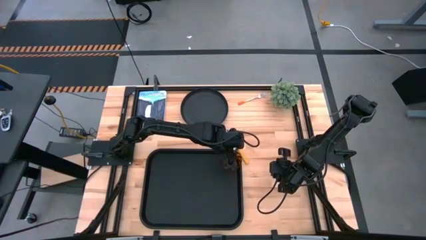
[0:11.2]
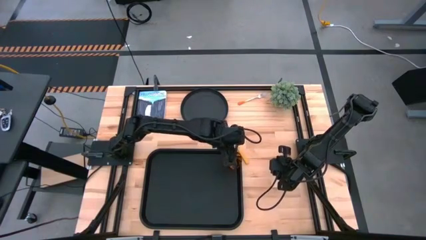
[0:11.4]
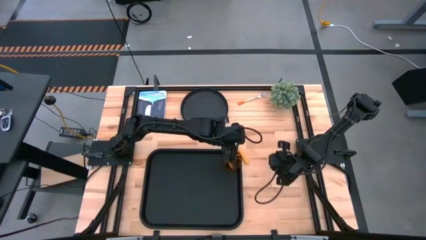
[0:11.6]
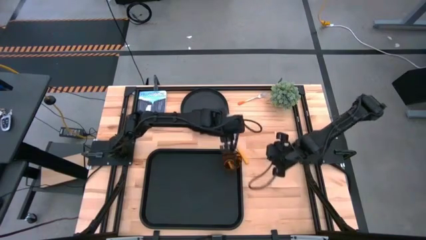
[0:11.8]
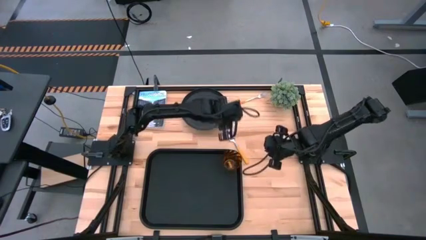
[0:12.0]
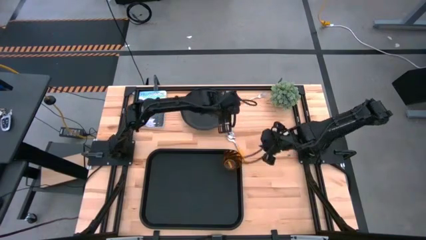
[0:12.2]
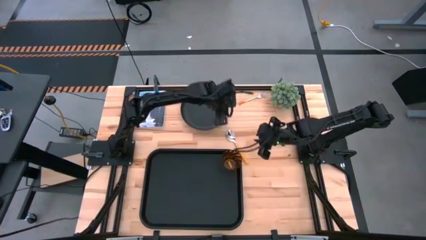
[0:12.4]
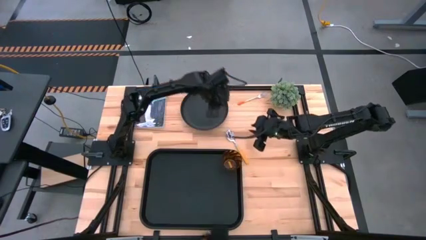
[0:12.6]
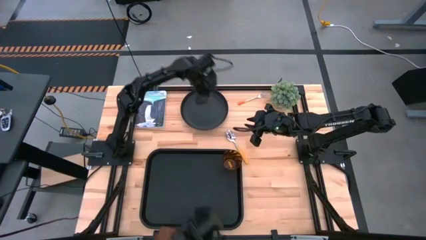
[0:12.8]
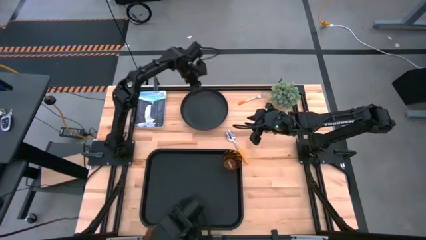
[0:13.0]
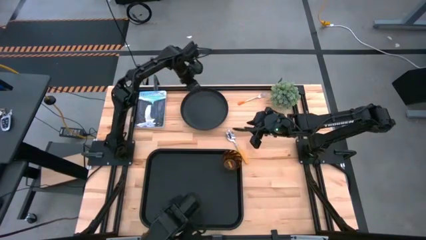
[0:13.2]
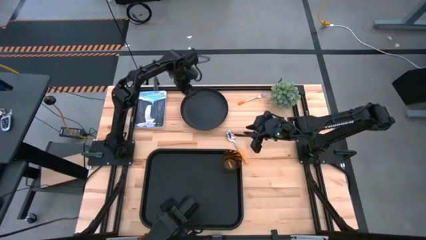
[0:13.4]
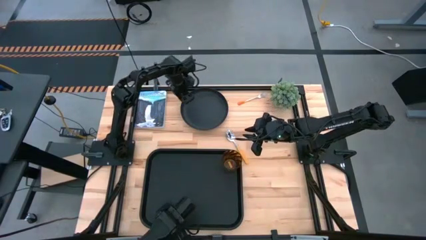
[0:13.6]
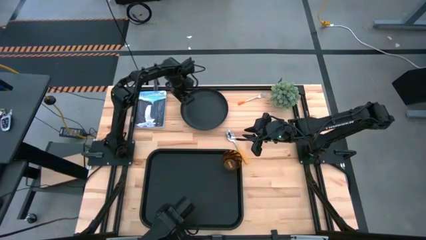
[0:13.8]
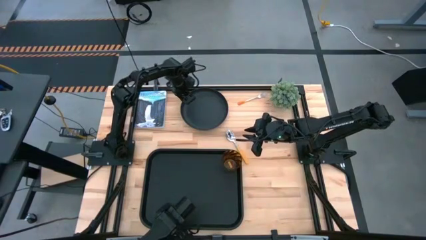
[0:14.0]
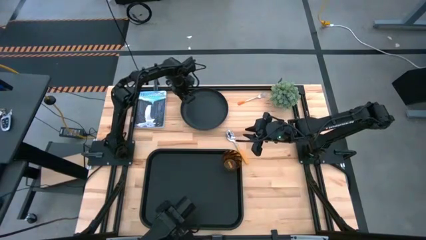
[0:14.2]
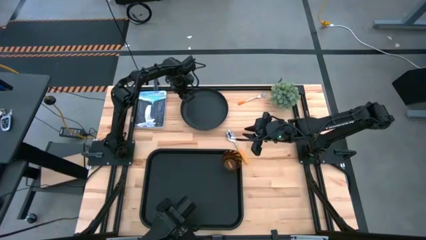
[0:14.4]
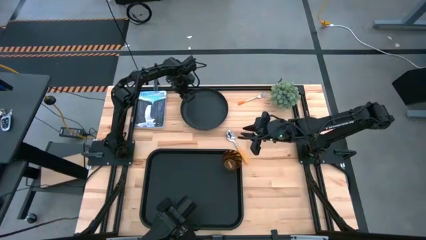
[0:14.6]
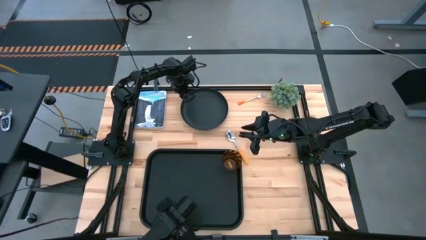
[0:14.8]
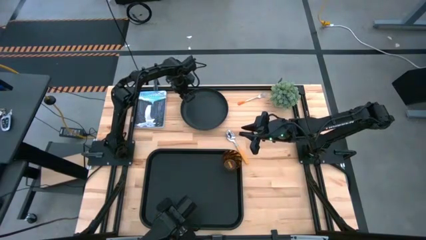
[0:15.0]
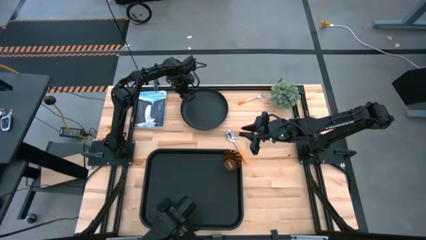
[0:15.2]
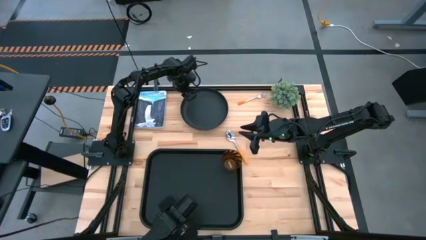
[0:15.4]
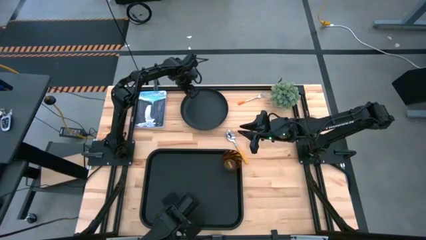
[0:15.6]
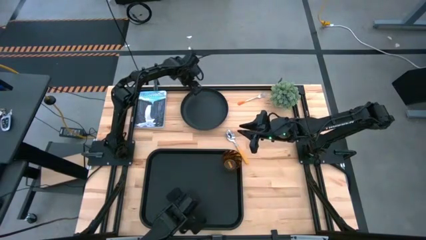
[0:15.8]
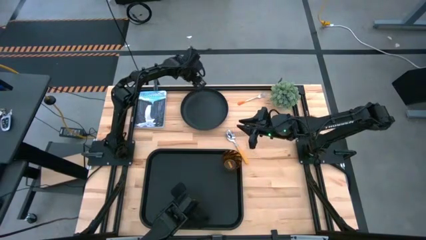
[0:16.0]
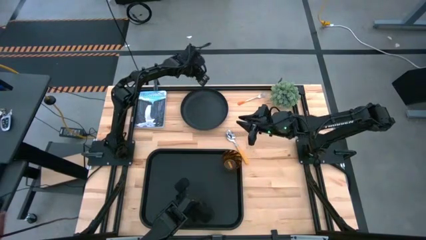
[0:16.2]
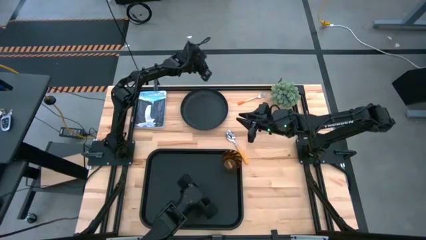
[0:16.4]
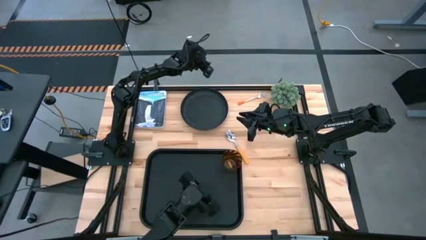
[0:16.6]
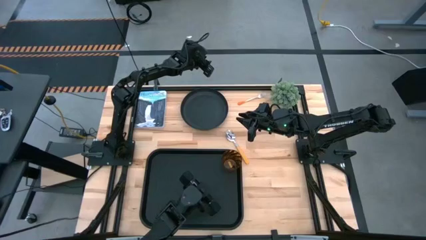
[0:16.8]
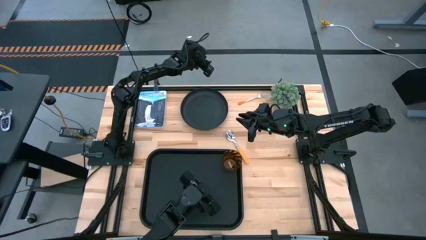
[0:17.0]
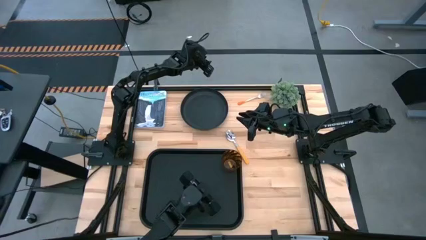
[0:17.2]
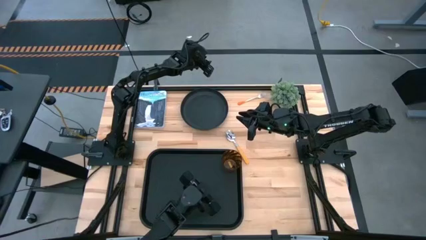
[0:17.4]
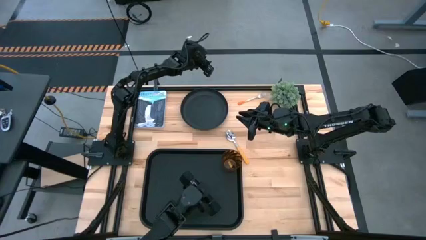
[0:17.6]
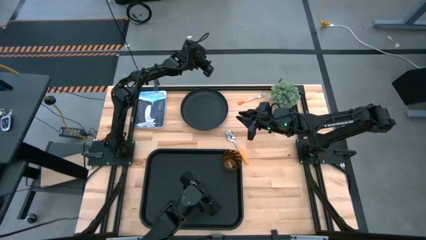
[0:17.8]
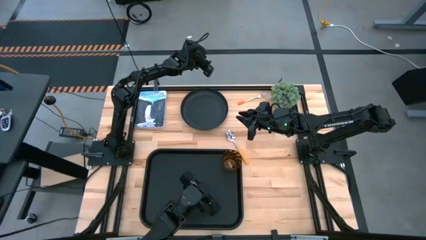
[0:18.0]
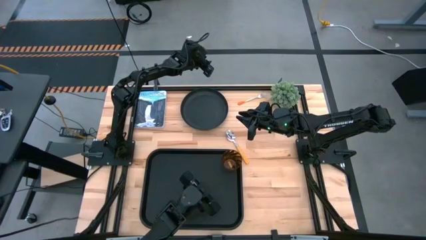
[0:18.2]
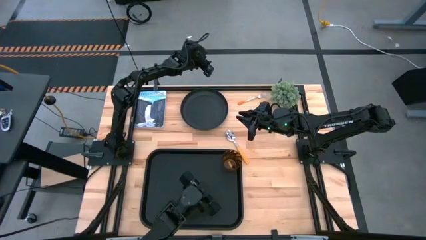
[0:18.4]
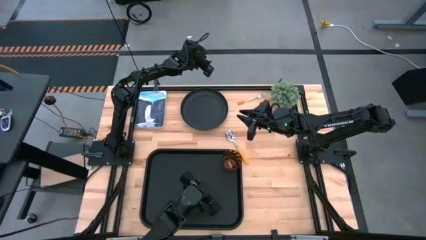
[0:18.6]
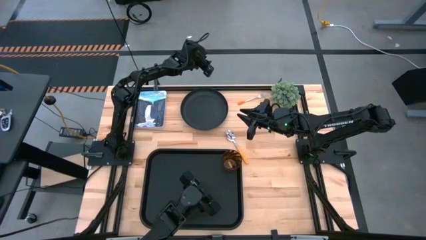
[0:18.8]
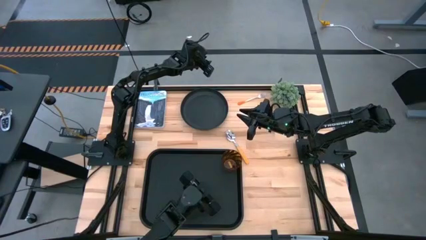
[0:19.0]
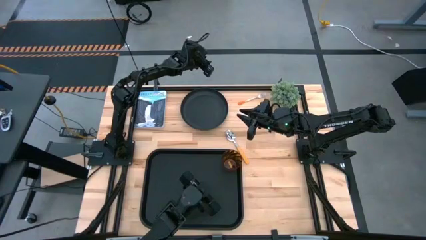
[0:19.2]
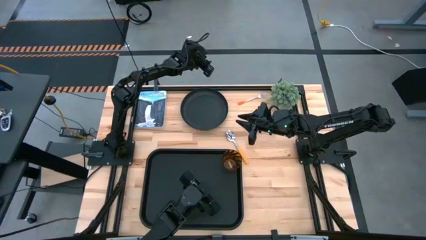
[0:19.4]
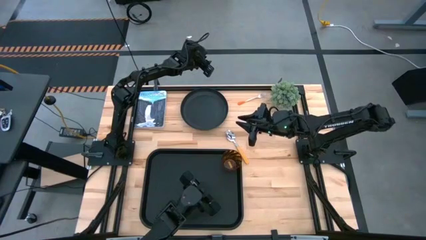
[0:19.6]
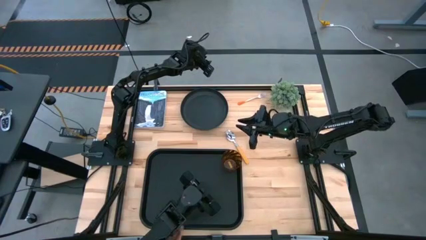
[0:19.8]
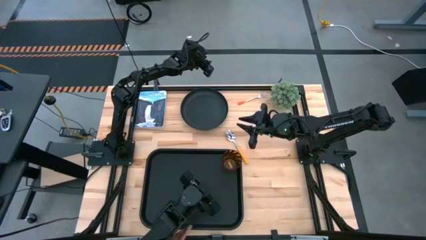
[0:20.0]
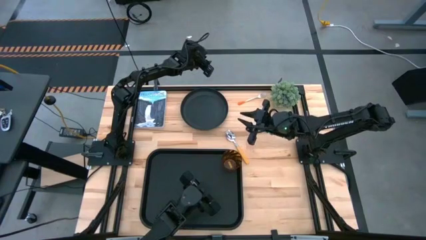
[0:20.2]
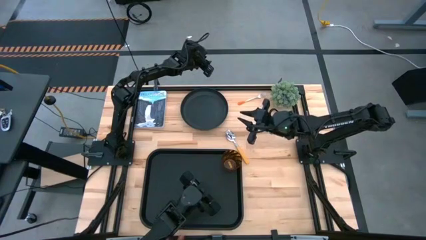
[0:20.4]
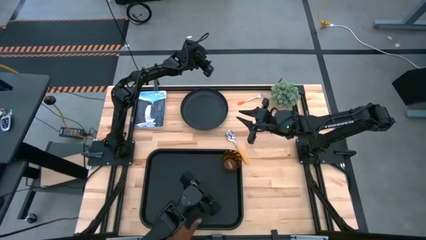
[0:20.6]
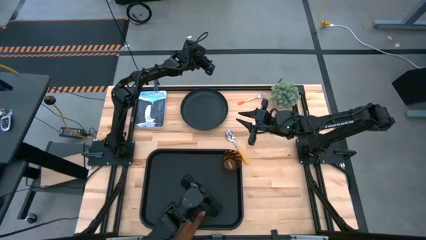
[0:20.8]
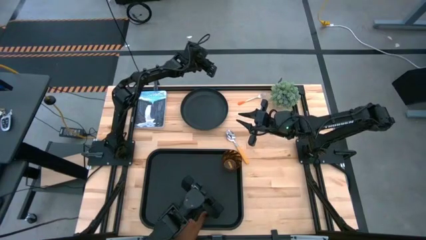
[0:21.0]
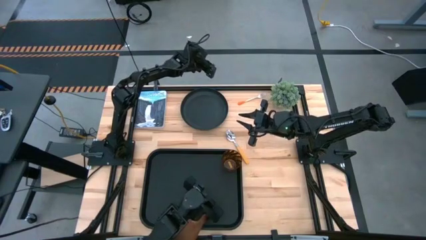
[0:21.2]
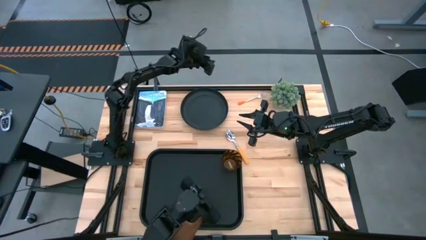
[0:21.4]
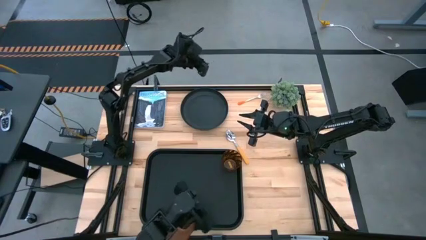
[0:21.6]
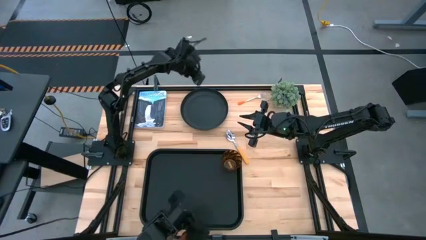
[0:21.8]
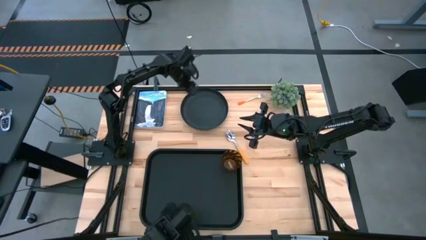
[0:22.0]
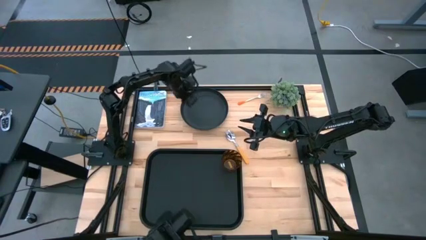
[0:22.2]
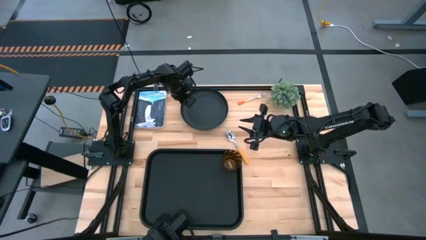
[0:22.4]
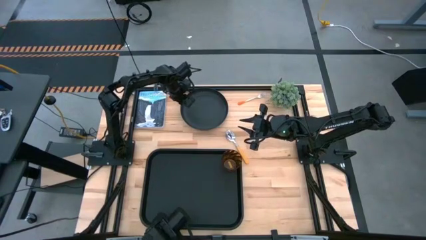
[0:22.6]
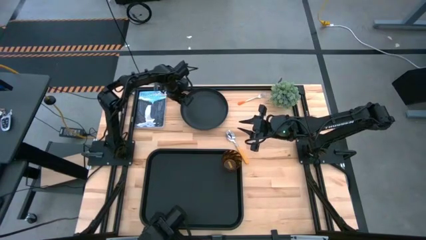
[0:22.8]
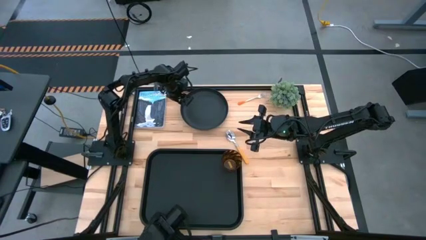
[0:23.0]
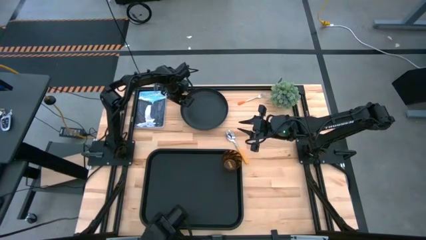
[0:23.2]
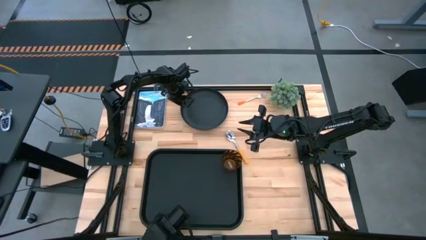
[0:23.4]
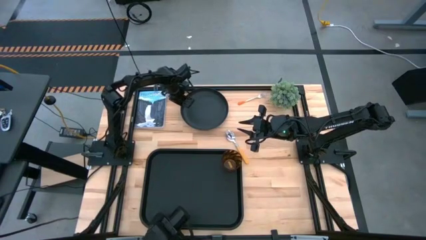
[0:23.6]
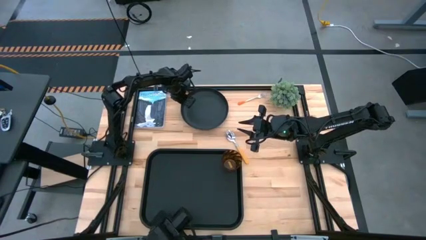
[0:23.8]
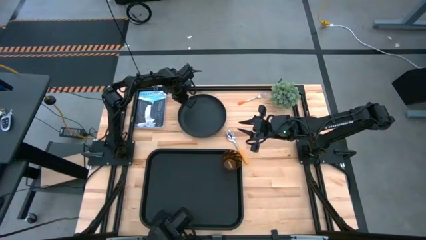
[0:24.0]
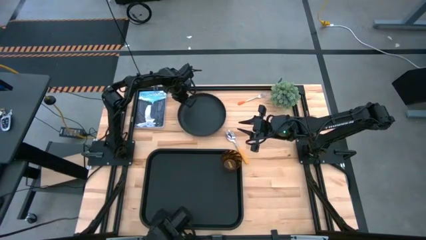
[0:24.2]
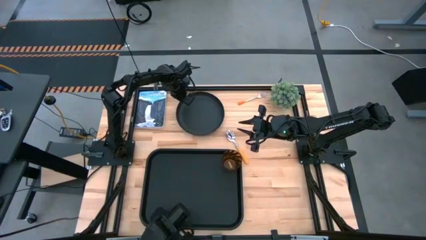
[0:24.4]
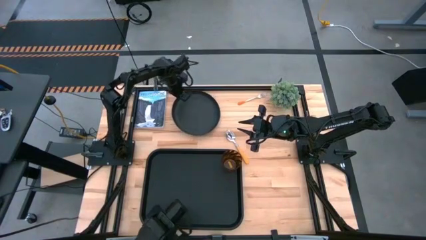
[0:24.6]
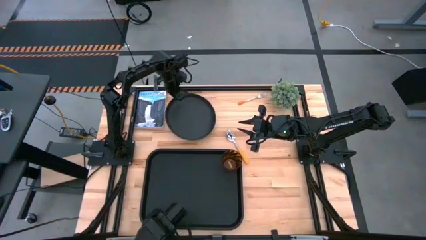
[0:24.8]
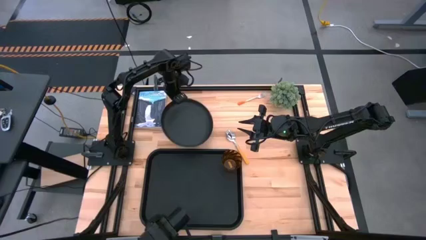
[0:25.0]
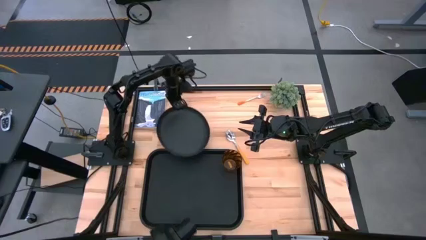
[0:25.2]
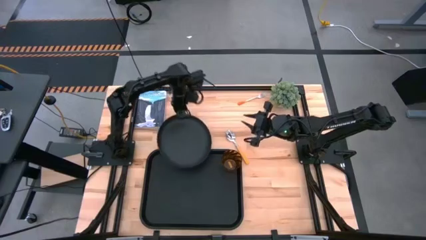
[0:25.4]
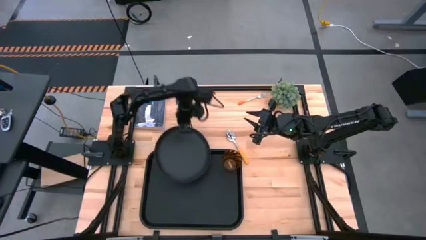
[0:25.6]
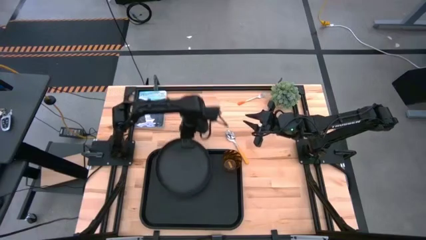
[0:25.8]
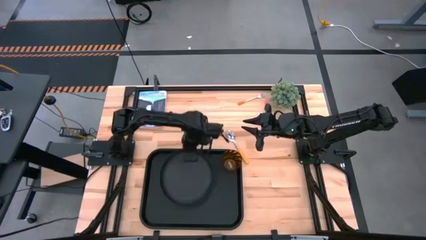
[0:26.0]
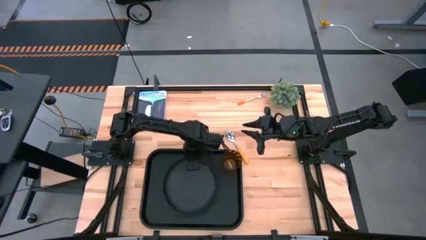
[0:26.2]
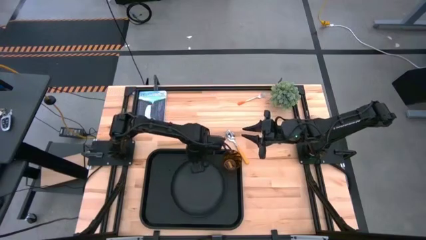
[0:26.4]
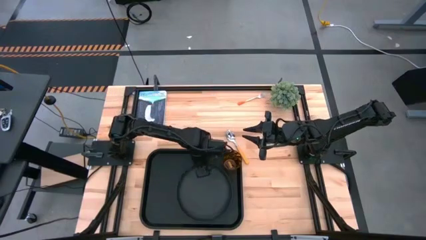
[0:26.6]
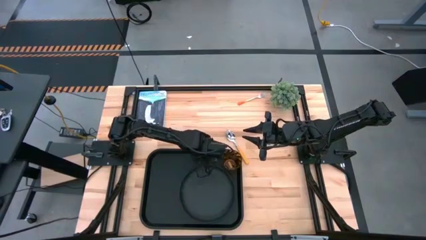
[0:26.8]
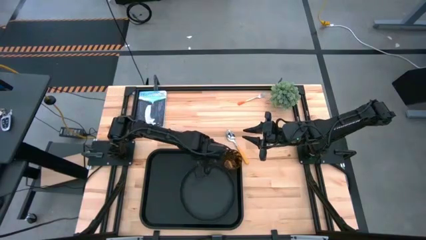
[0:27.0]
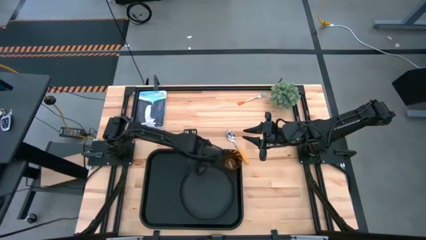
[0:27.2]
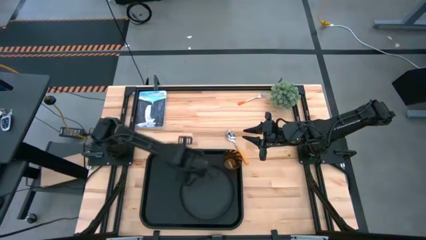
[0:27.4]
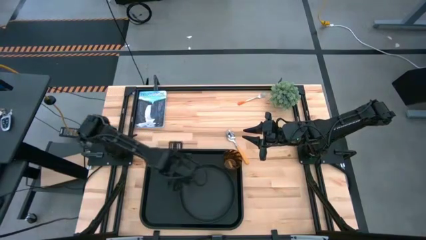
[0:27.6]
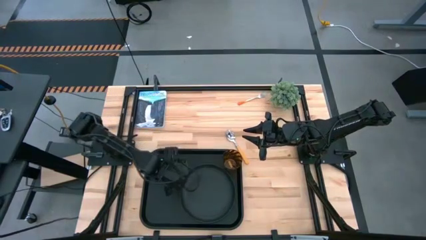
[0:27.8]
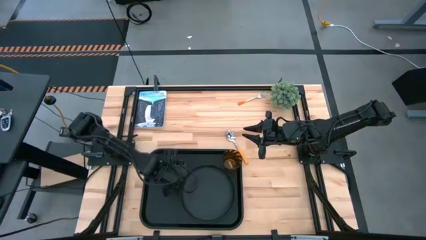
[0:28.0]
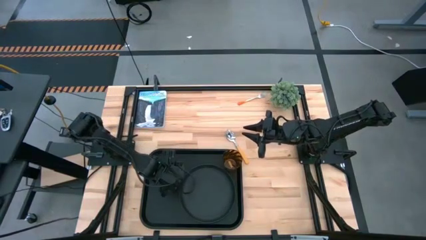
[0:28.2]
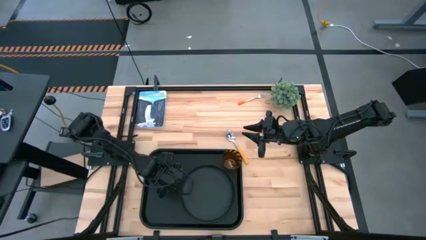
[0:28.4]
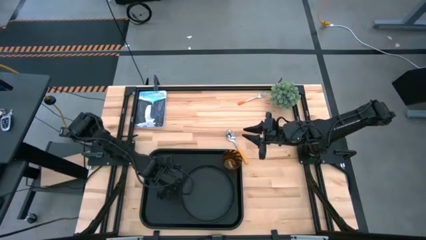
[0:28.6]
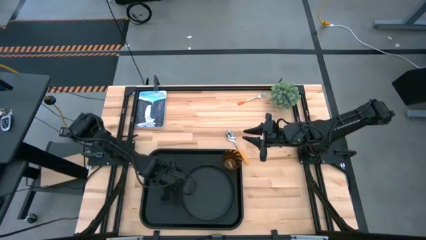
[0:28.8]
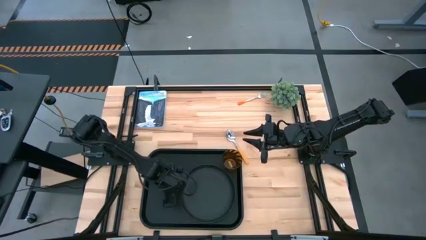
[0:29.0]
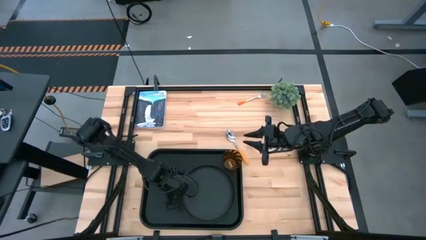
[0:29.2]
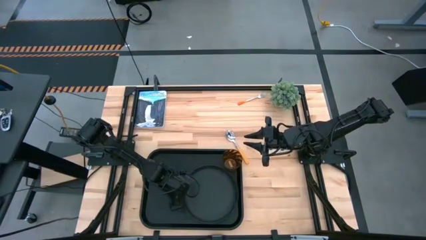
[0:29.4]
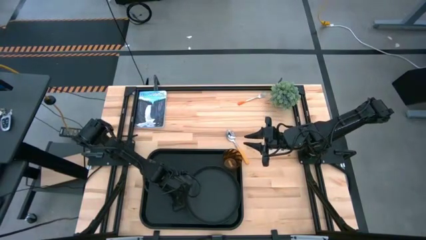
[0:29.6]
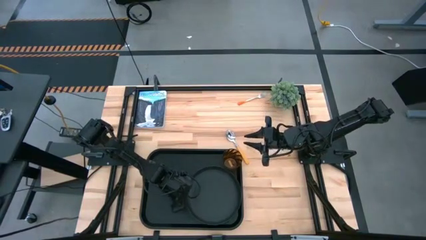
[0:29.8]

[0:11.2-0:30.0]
Task: Pick and place plate/cup/fork/spoon on tray
Put the black plate on the black tray
